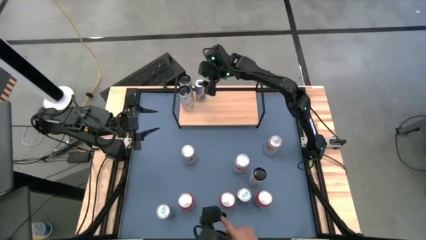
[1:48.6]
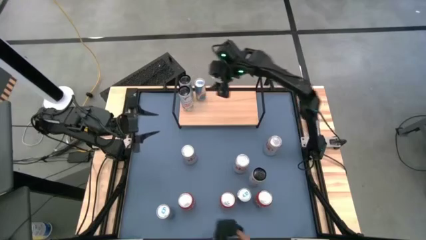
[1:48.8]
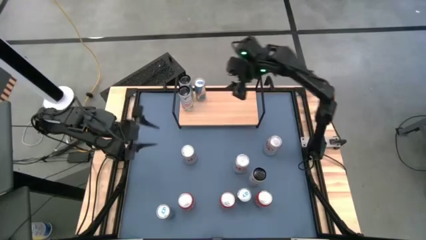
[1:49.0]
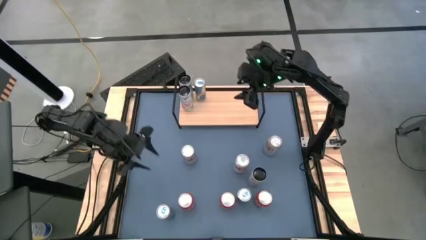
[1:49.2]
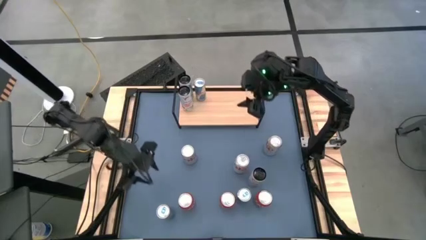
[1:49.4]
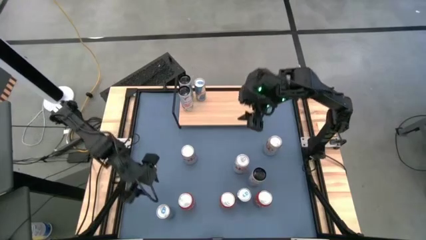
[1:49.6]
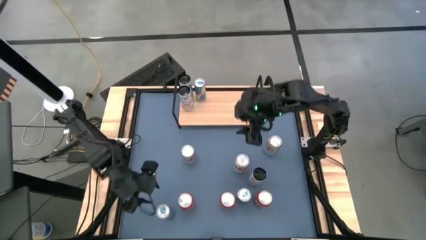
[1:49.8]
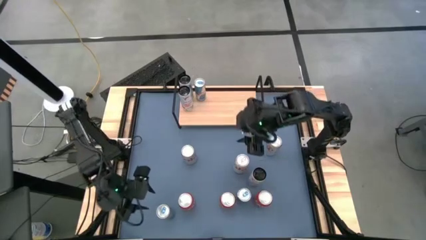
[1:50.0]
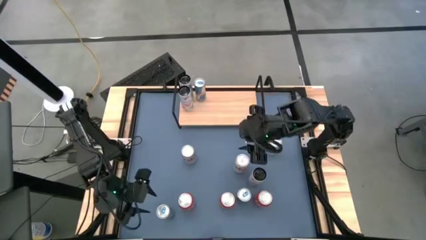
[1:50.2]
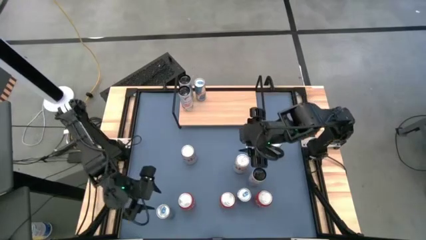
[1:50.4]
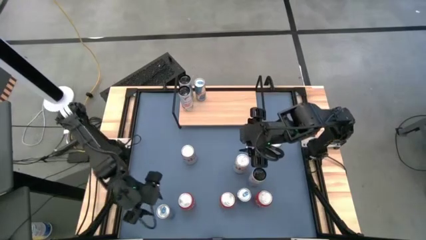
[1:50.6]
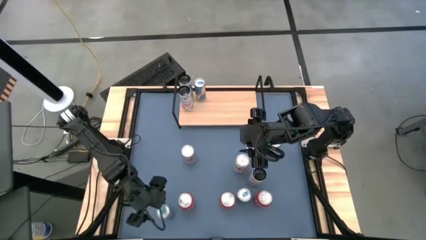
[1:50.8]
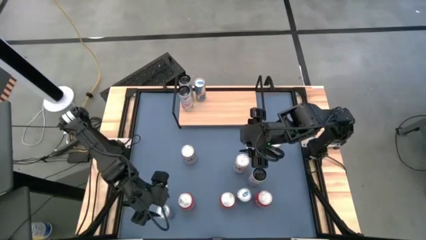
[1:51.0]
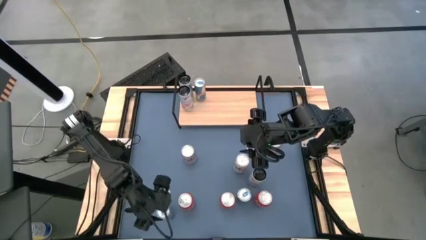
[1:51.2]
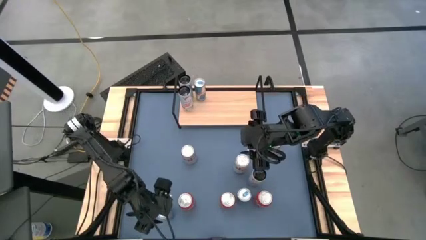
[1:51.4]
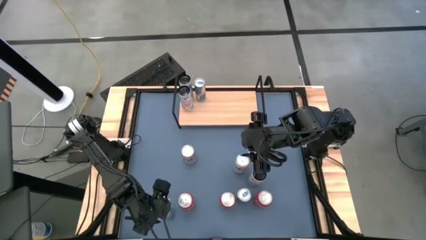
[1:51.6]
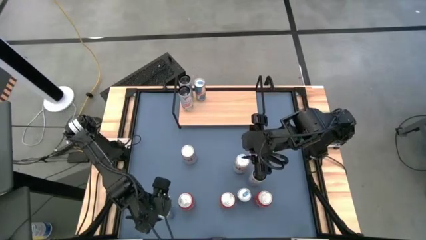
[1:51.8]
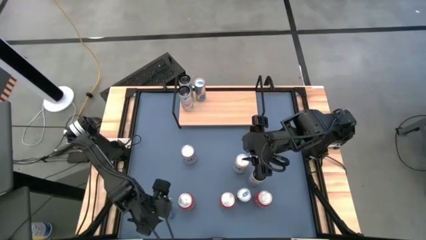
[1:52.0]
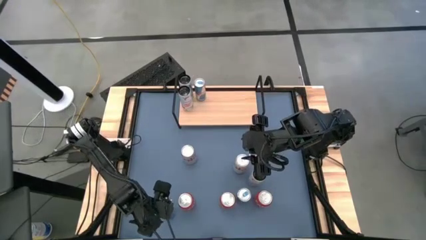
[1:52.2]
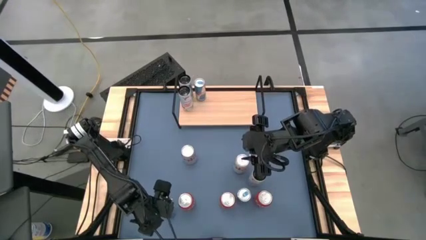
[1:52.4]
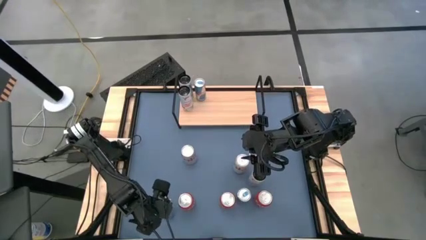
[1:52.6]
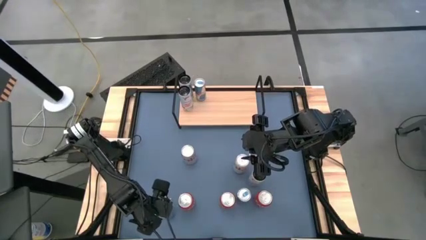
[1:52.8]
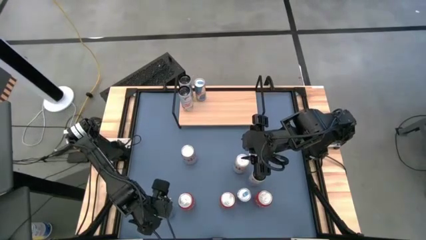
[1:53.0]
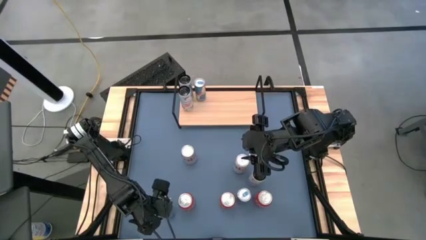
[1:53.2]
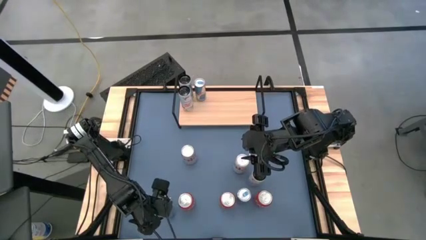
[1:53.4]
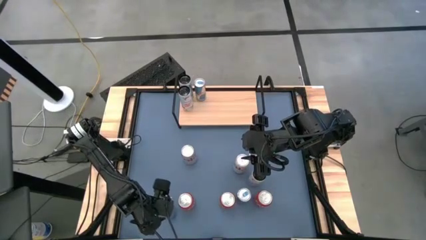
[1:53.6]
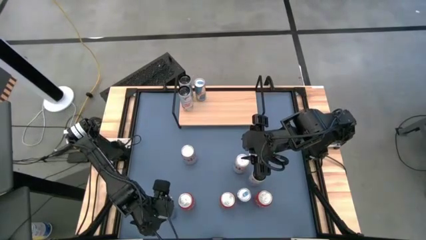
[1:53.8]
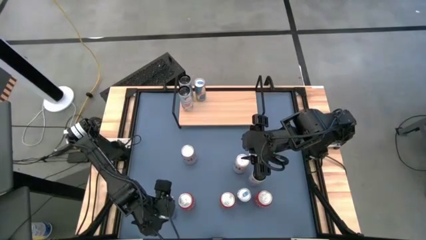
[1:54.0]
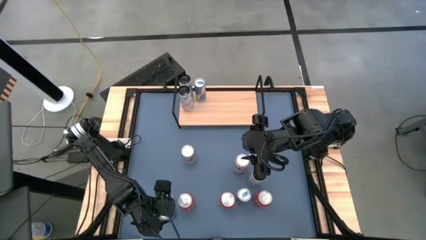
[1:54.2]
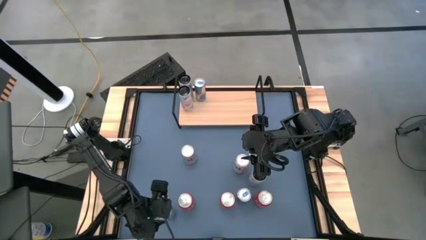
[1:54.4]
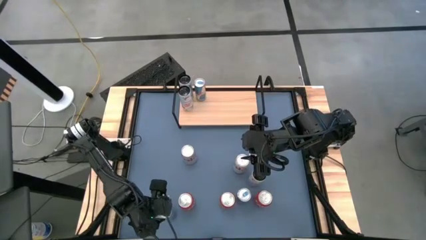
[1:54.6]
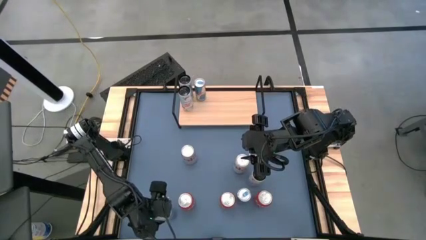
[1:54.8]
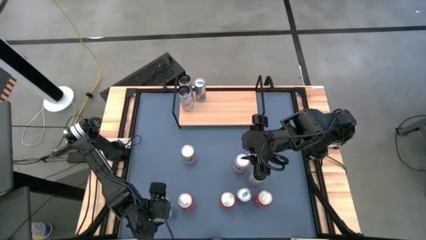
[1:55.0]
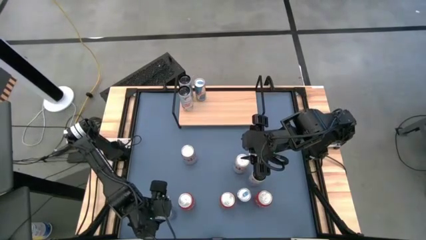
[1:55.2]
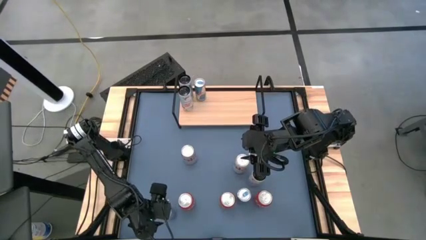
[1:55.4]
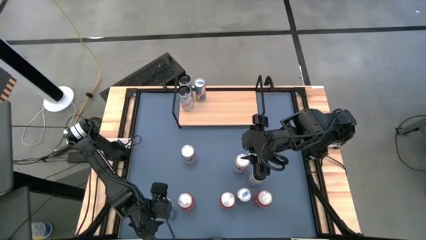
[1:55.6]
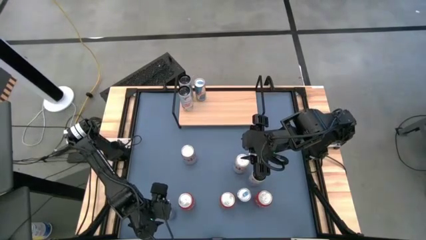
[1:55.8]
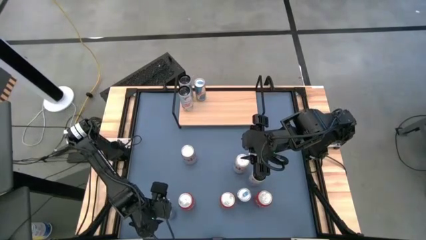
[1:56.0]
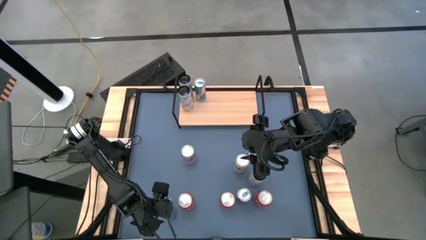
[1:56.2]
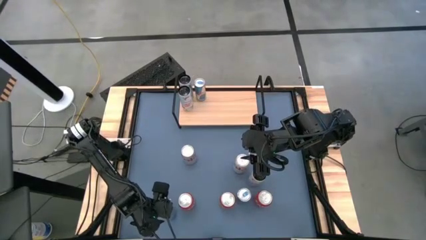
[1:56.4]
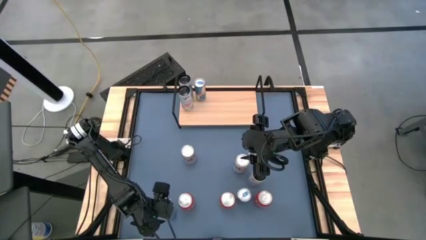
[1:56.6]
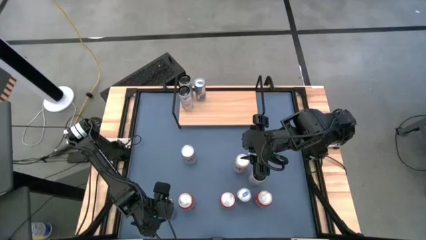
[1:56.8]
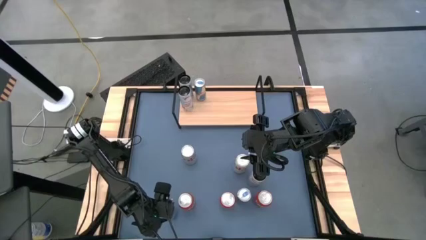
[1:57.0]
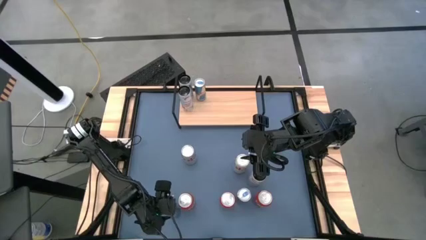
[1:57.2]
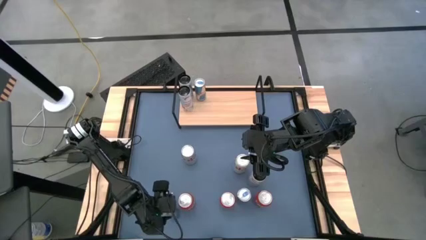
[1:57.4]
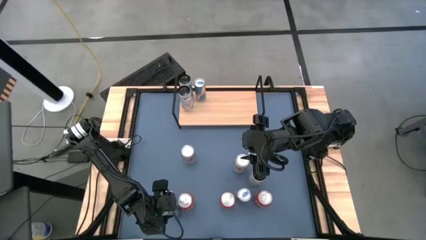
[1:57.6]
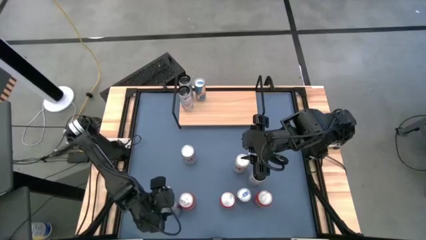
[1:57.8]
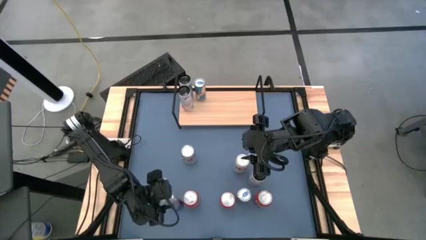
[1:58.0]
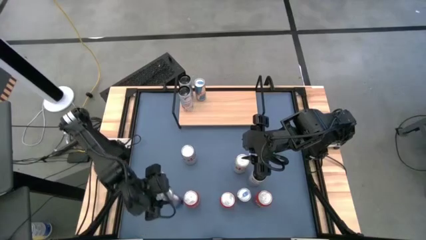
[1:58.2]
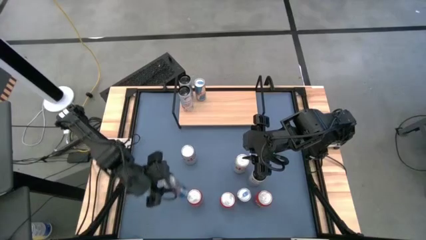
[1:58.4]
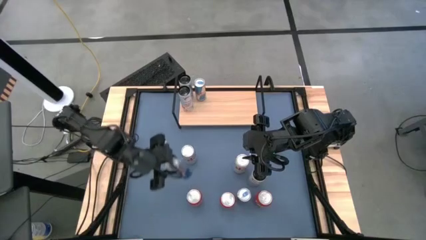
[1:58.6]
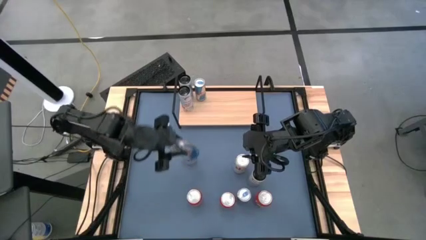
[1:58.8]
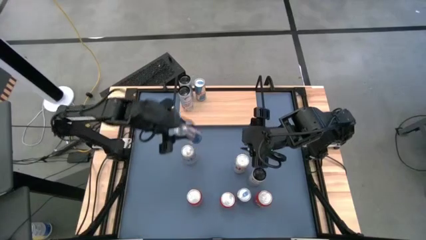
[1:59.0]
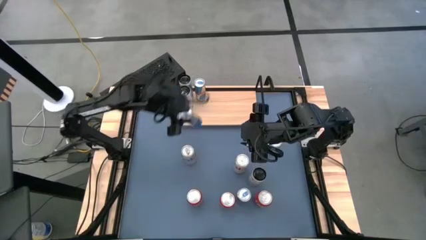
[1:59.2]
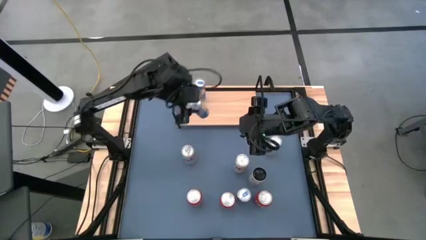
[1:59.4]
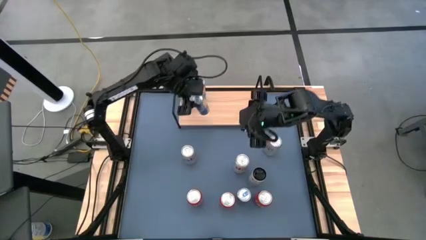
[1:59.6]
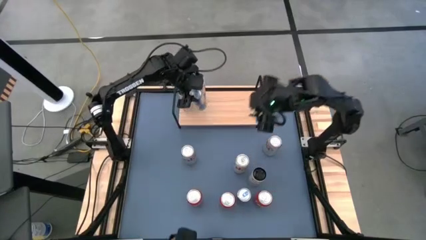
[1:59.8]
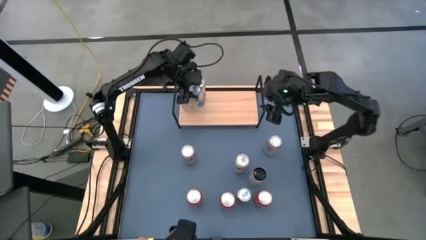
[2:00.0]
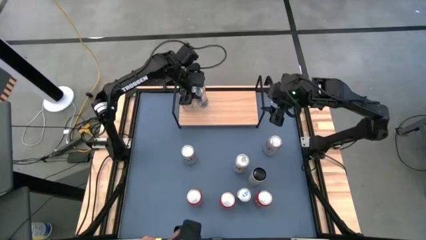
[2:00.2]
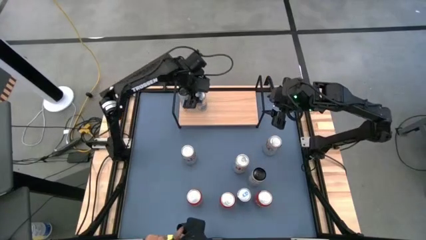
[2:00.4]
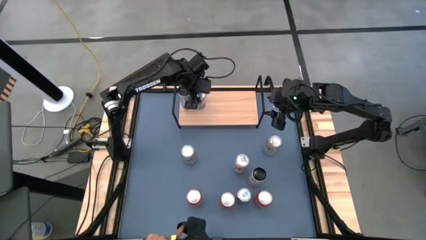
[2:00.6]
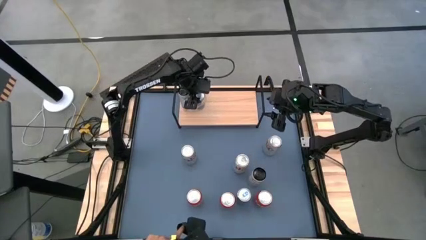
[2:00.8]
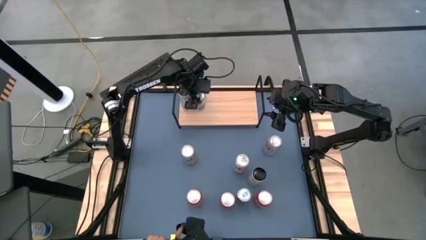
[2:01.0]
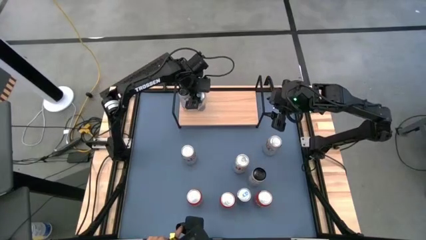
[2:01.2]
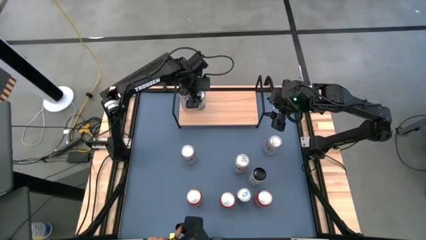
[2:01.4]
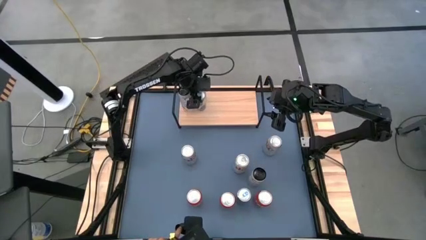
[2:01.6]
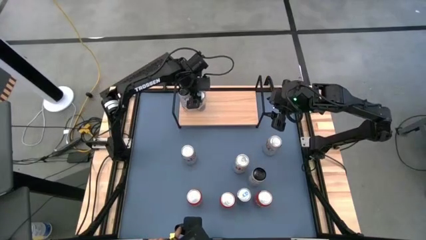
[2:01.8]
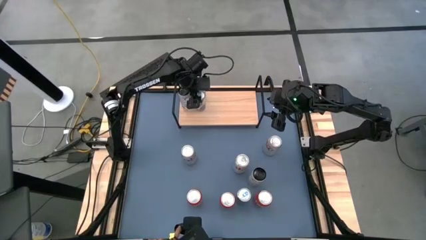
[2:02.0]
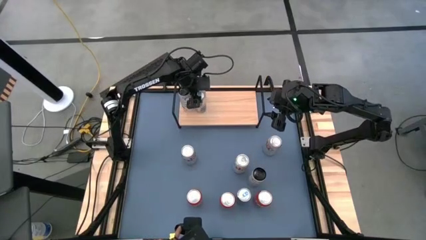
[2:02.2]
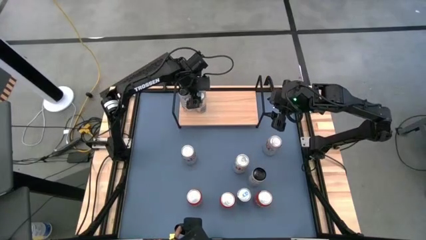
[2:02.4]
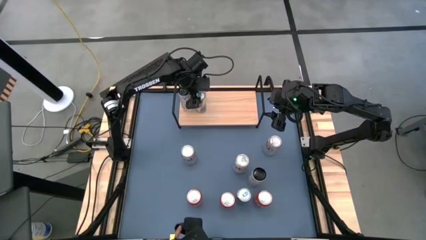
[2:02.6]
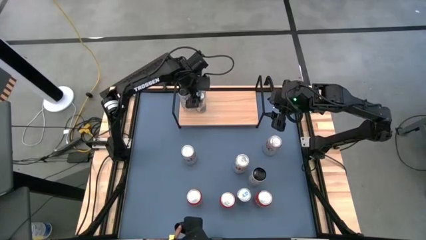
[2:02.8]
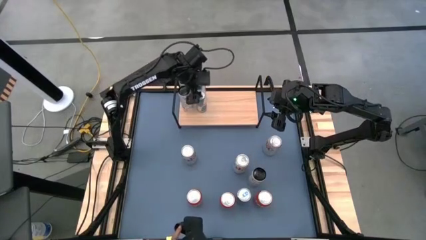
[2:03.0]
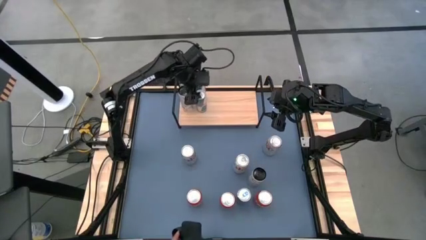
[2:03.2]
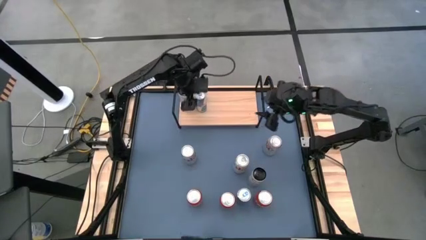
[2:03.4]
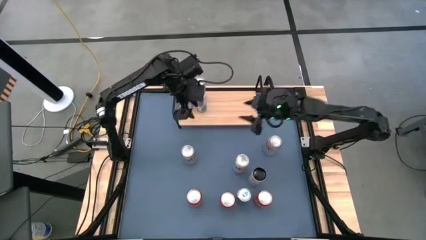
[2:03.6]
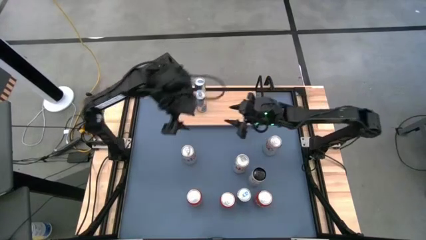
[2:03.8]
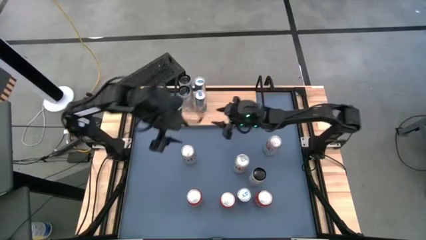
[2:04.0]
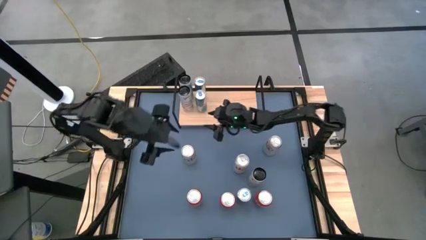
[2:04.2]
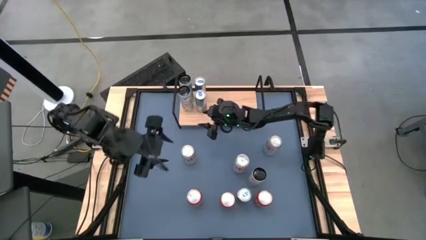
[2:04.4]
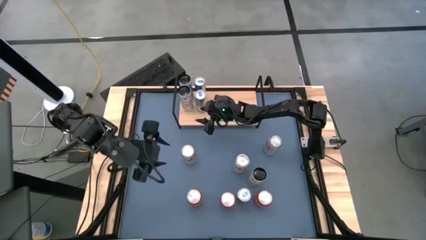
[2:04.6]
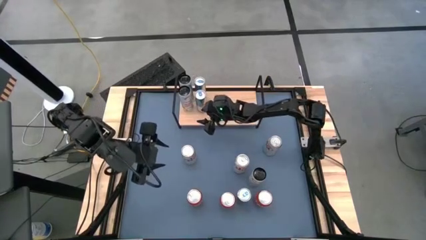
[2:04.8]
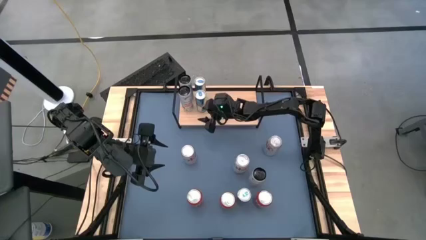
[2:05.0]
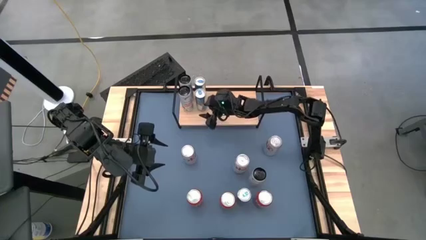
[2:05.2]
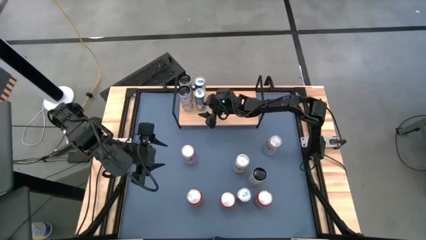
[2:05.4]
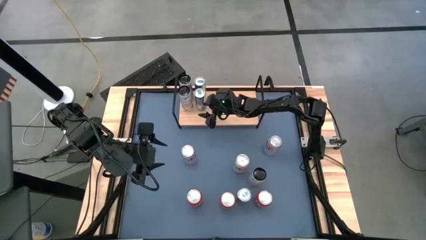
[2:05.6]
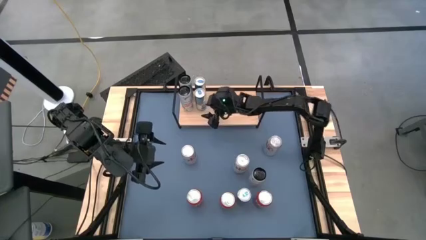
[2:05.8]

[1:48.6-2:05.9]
Task: Place canned beverage on shelf
Put the left blue soda can aligned with the other blue soda can on the shelf
